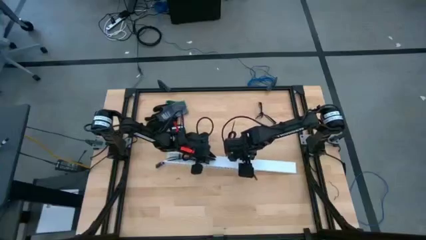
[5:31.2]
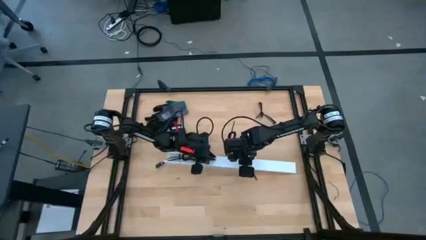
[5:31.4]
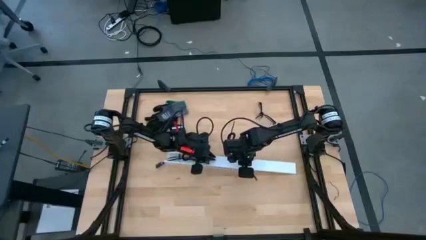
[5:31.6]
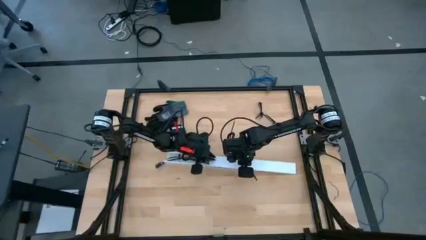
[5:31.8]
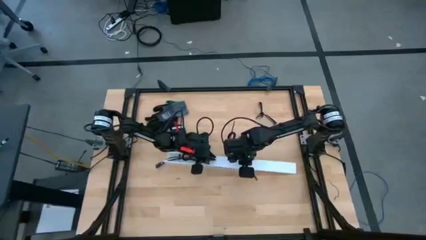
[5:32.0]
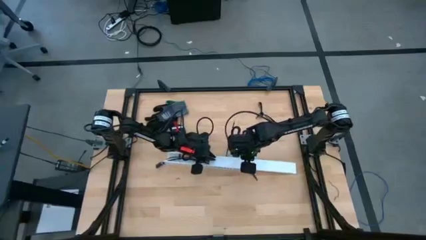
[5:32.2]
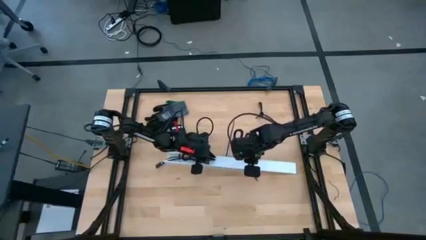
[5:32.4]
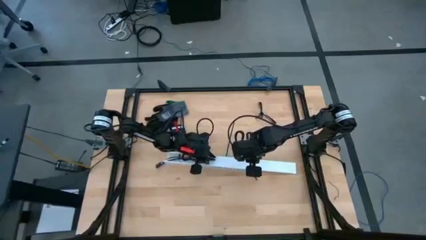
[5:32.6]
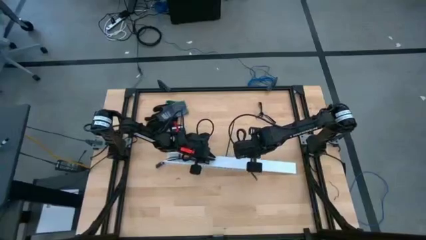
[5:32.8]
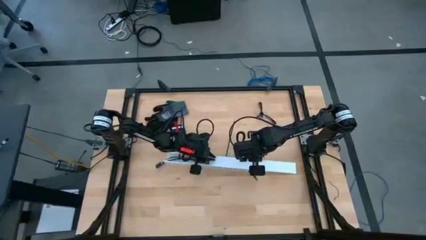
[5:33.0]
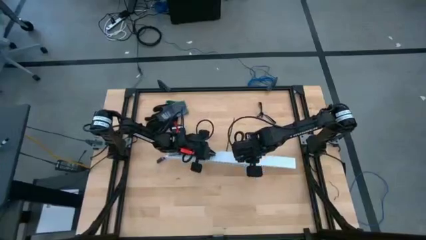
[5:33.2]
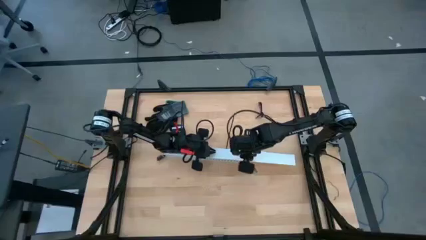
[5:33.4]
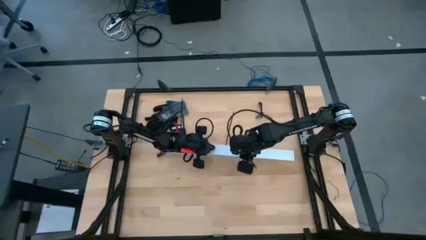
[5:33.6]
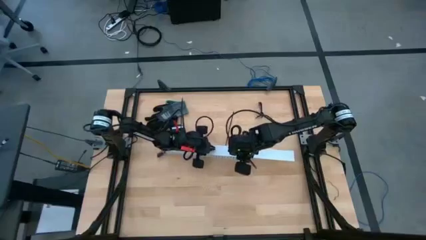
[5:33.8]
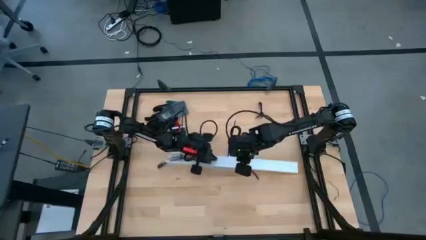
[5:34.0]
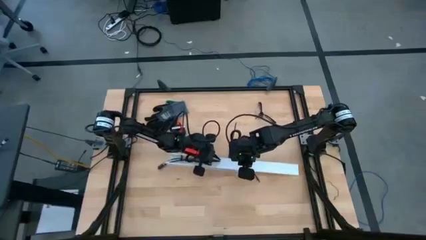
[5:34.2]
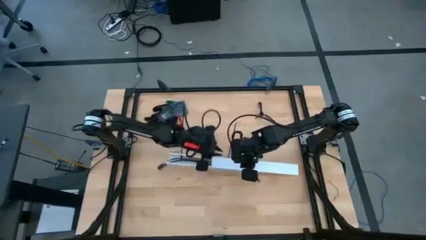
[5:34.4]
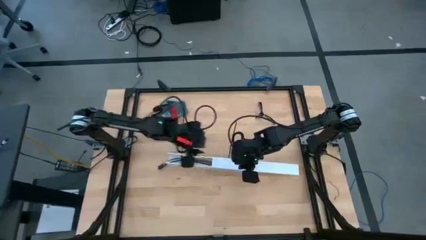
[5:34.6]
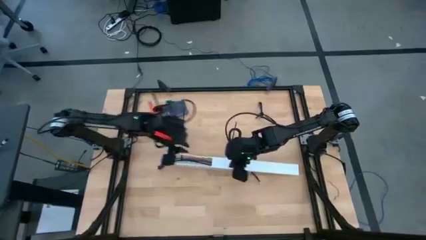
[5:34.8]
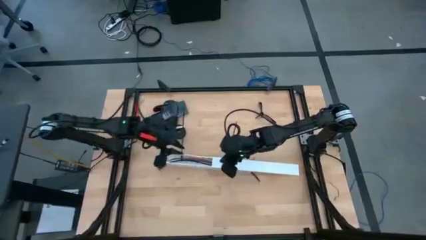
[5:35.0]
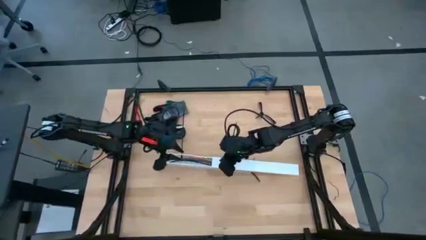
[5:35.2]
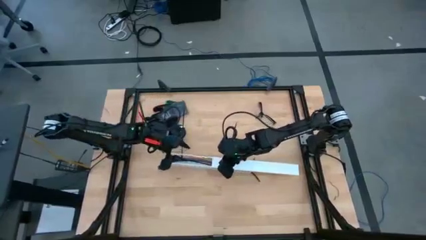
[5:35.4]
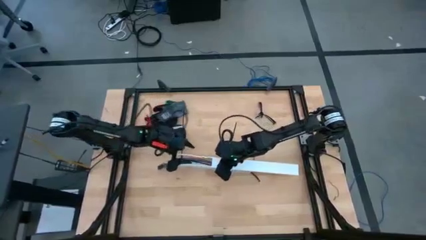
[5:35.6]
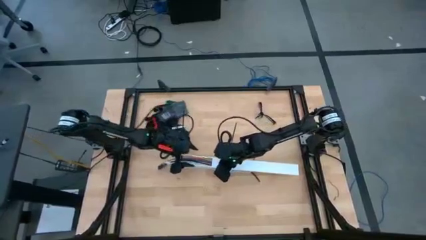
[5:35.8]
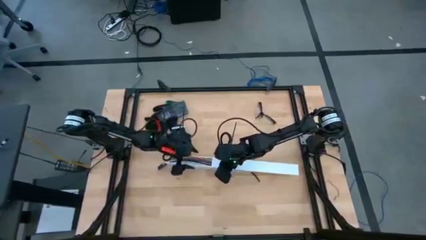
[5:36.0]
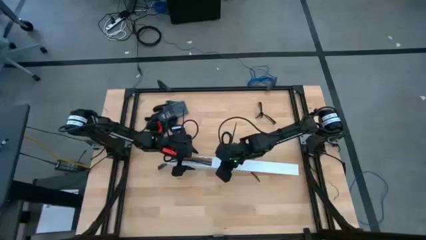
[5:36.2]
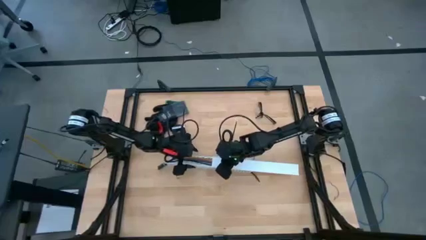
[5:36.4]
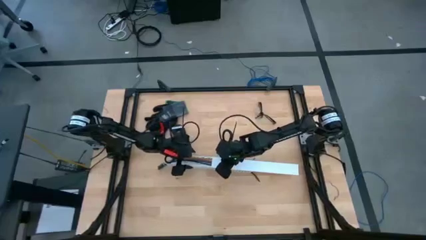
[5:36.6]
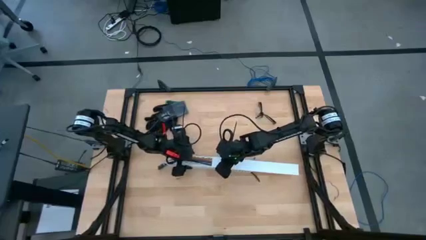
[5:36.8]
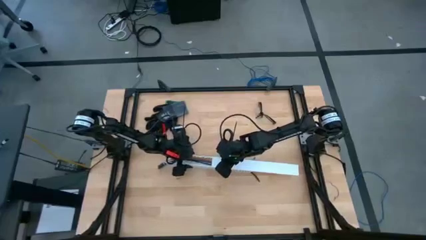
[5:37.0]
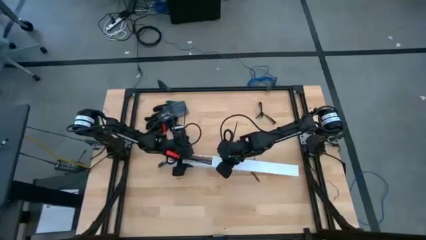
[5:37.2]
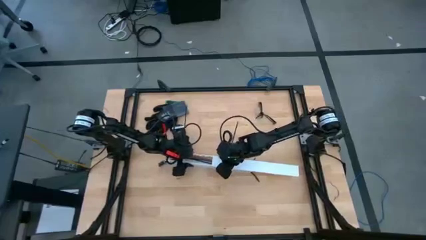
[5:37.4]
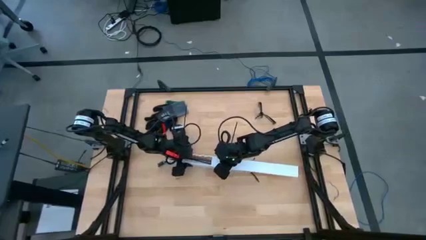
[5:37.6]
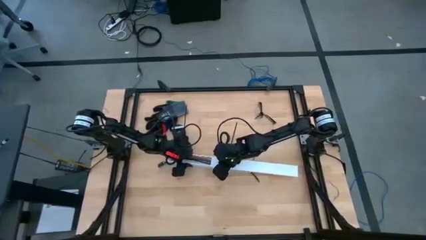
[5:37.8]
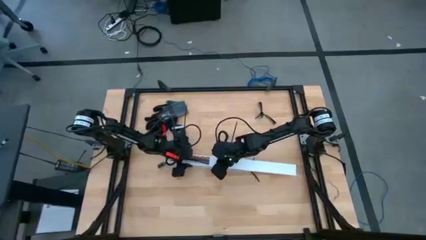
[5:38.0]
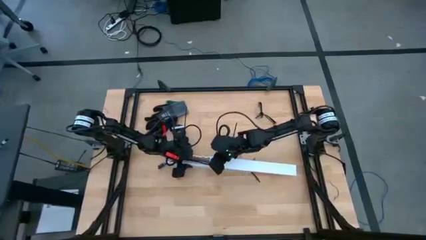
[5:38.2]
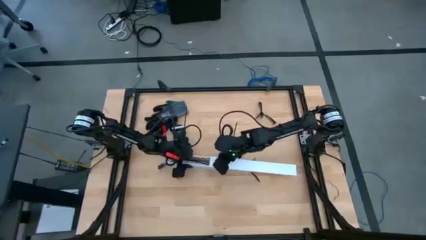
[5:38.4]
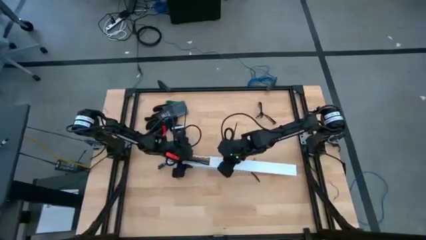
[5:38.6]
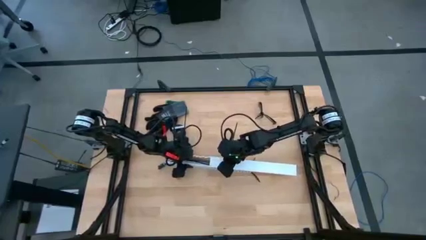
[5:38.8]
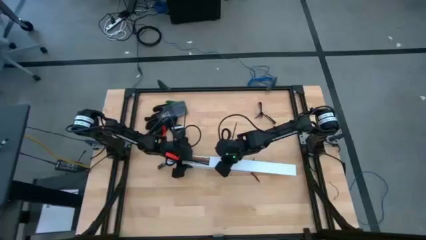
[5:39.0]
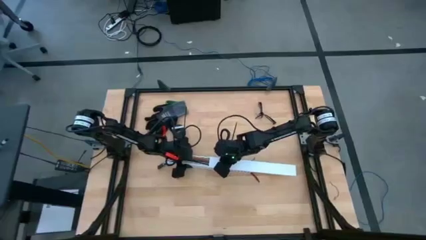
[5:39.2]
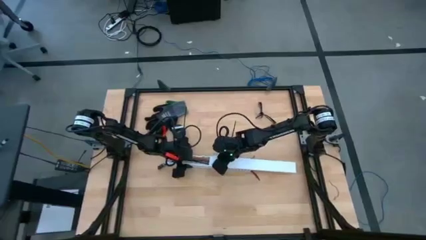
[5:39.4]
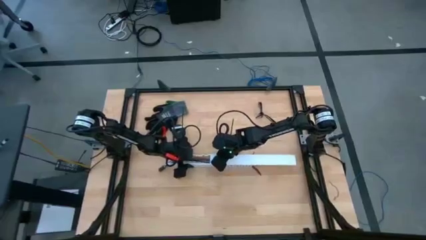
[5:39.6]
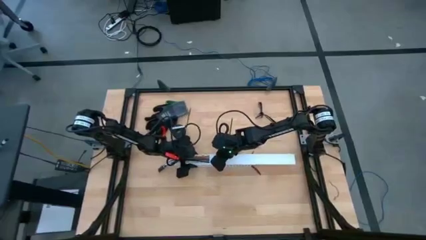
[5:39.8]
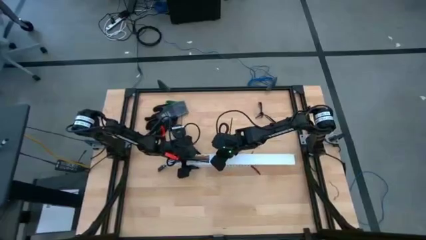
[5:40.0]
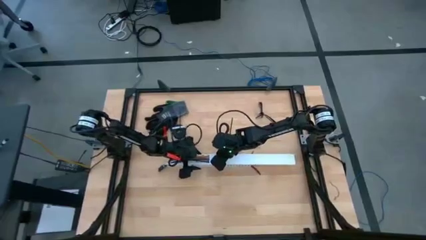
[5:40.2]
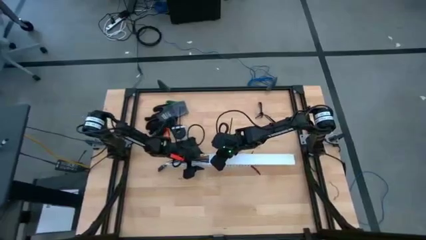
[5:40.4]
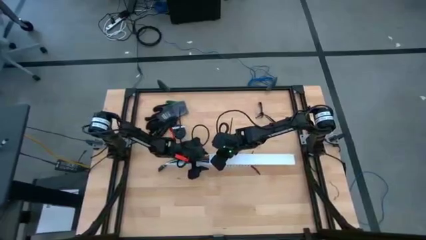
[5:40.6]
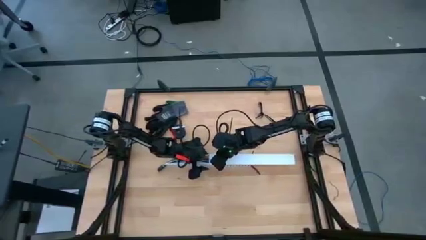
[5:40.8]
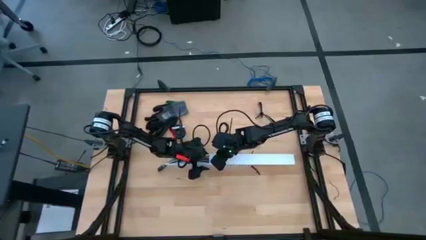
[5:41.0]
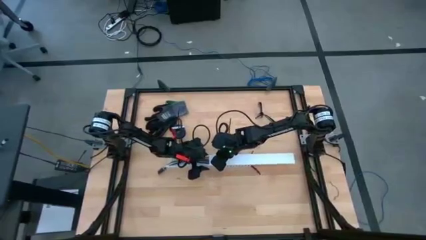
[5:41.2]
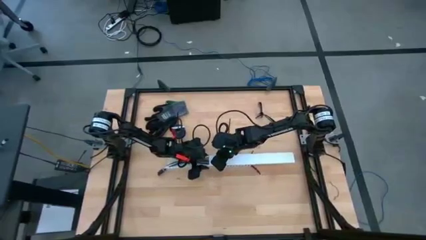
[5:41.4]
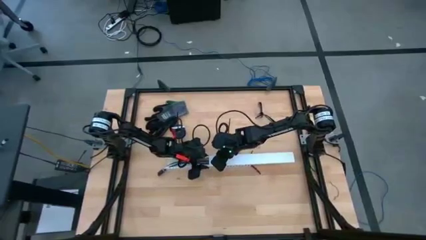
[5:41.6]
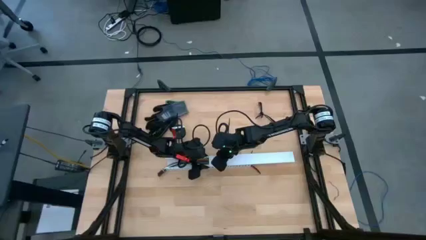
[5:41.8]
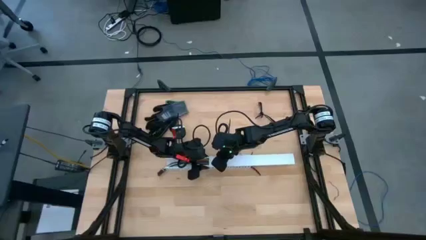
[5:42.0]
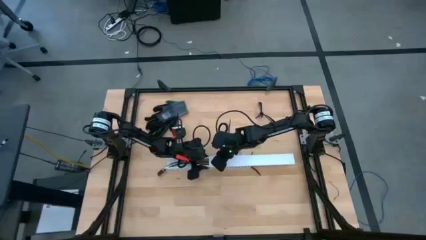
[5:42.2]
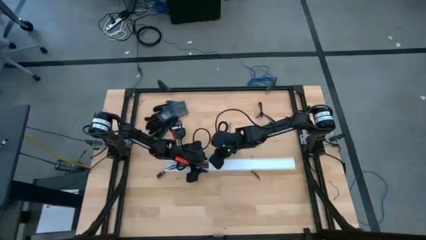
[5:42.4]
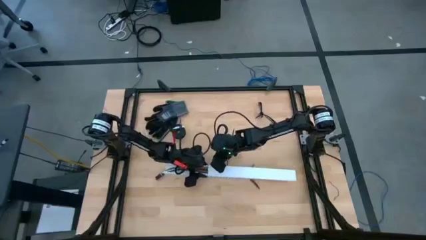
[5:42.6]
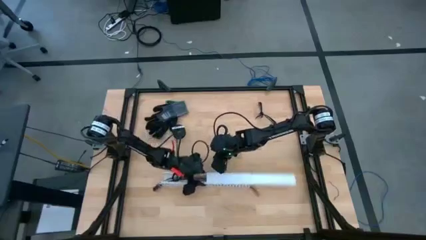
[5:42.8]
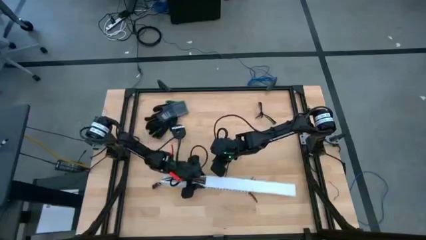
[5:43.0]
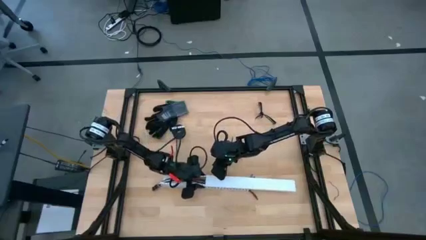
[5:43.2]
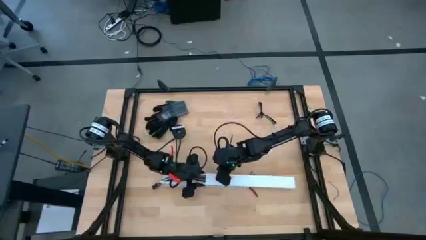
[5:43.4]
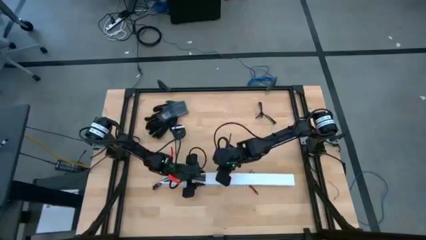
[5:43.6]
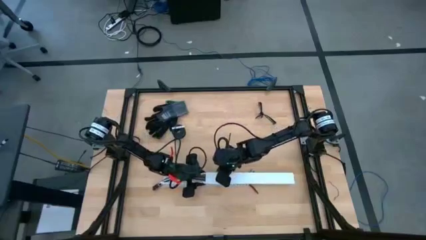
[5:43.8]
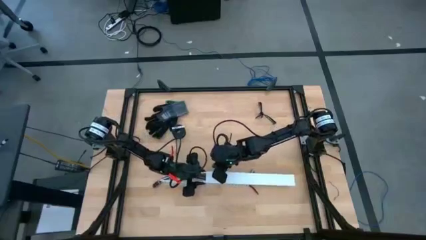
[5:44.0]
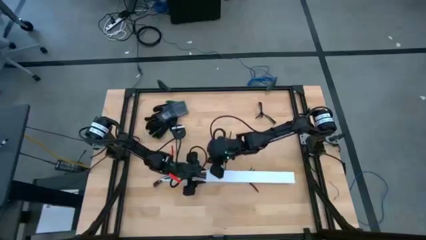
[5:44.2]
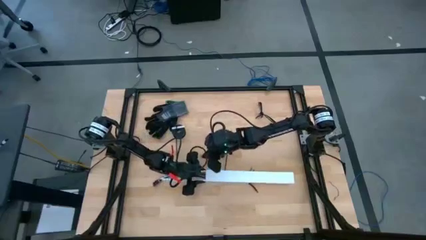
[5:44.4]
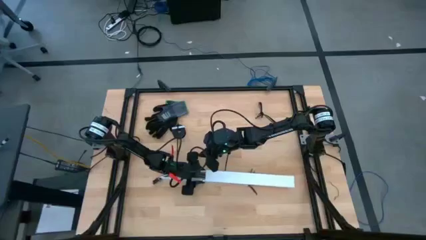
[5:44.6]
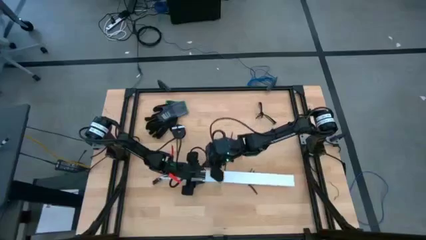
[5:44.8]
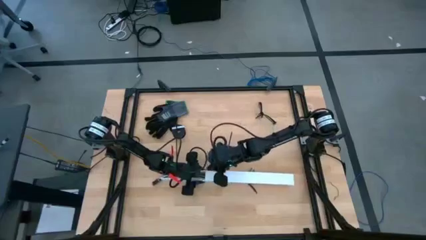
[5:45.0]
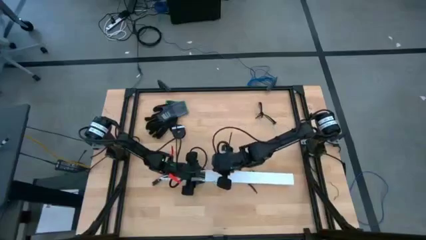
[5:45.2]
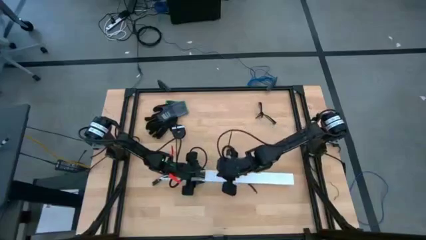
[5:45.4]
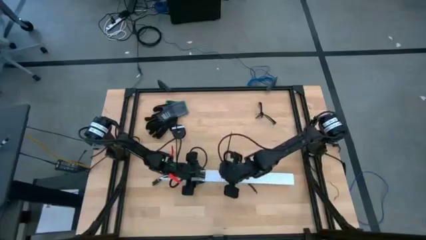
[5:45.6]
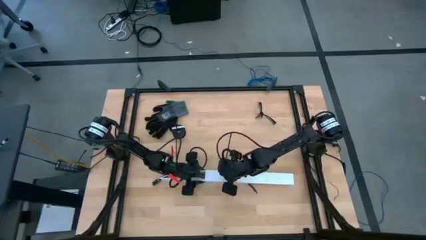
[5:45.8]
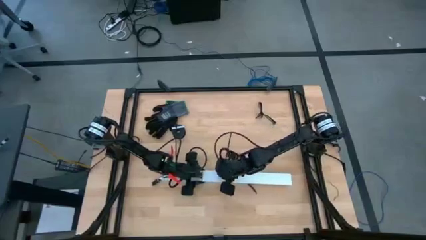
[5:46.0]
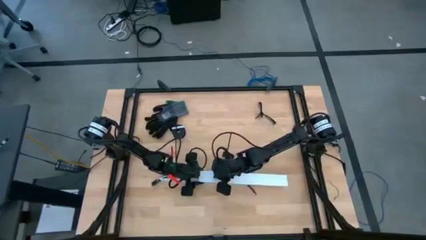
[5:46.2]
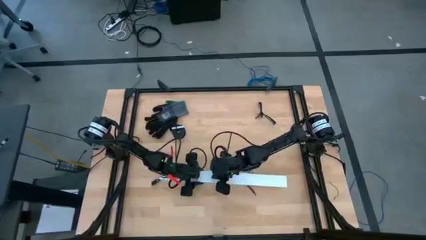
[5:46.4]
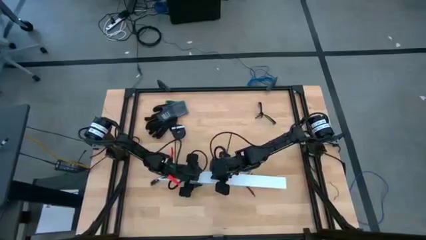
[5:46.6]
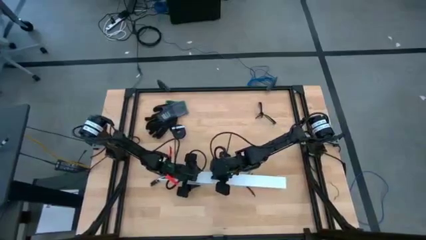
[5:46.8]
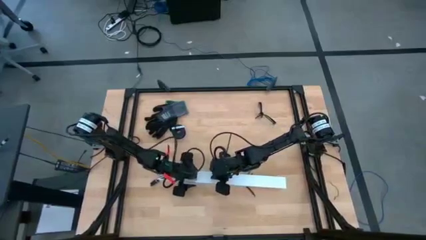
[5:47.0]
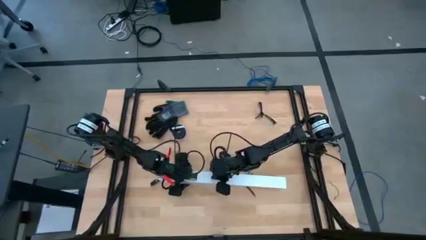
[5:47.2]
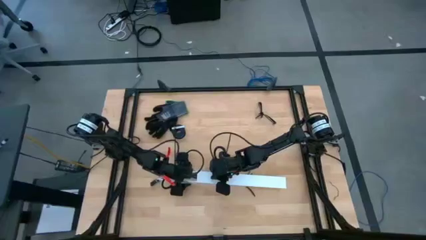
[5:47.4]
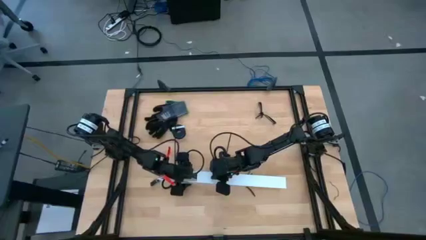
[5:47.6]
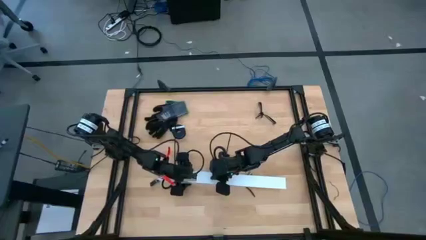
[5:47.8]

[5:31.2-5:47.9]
Task: Ziptie cables
Close the white cable duct cover
